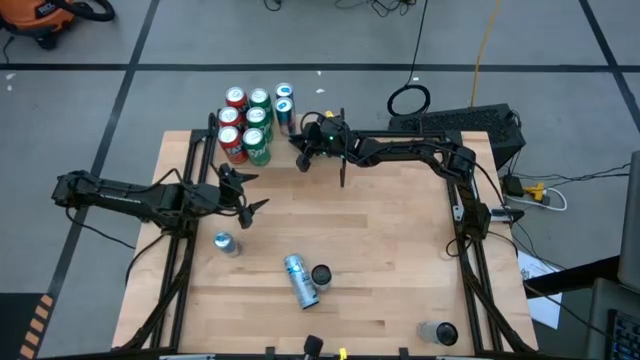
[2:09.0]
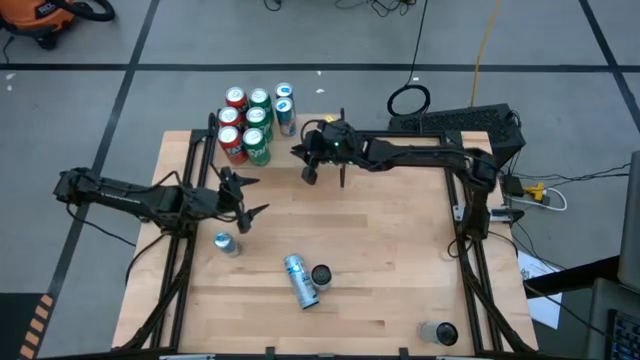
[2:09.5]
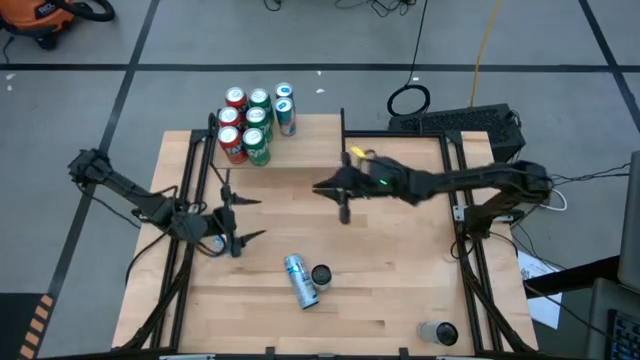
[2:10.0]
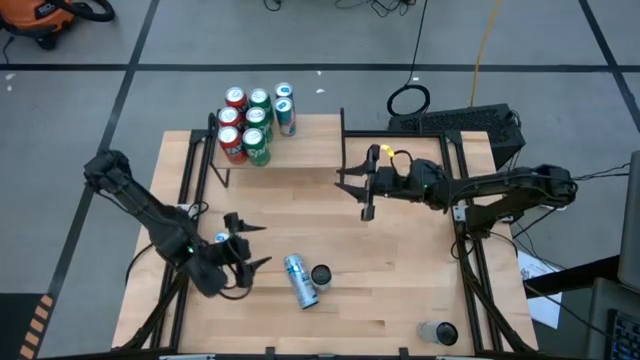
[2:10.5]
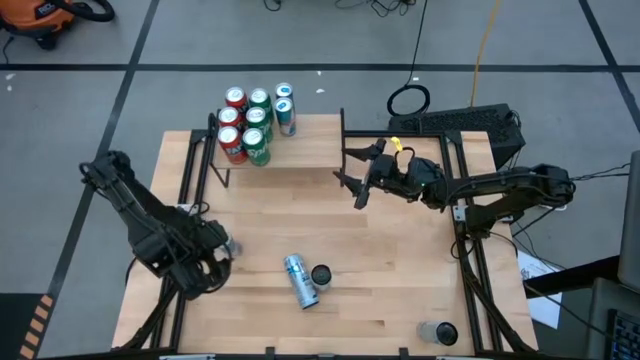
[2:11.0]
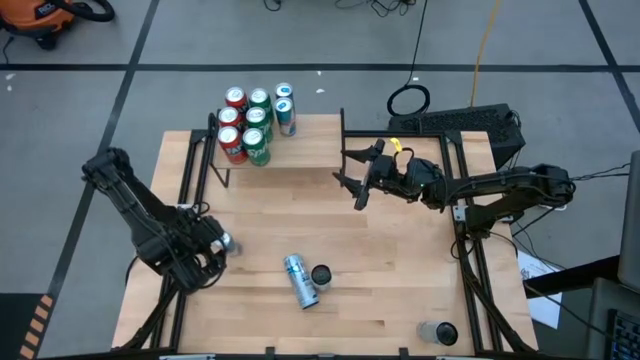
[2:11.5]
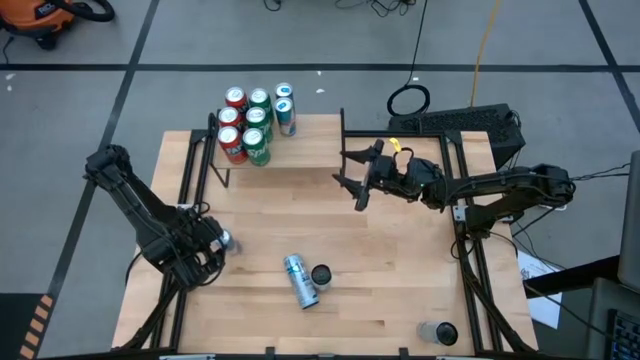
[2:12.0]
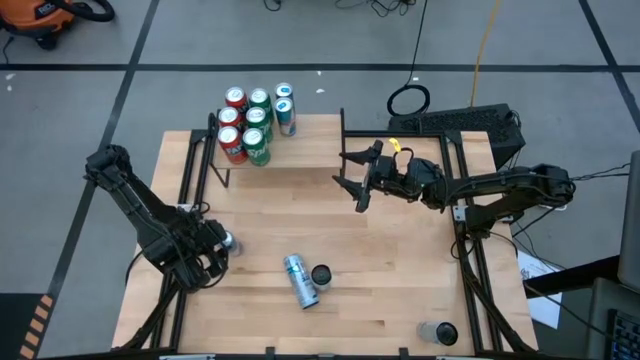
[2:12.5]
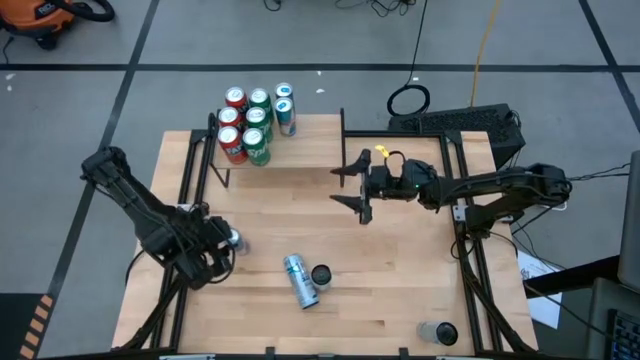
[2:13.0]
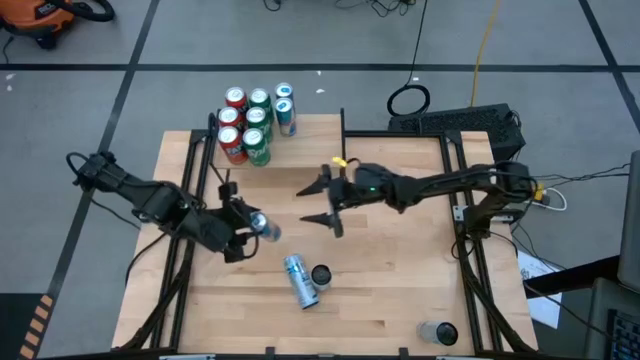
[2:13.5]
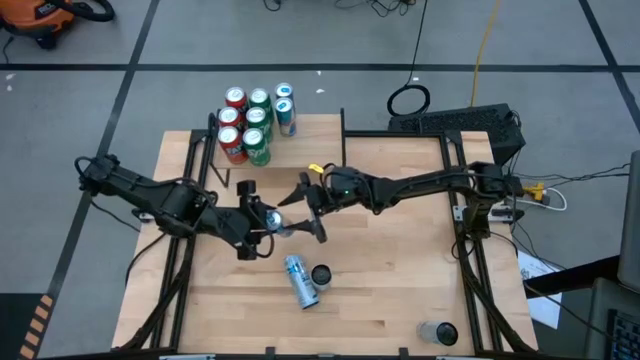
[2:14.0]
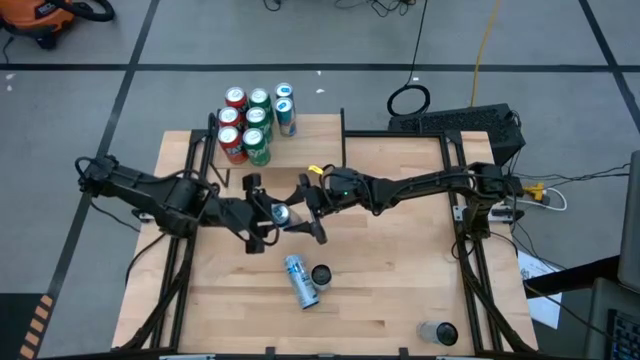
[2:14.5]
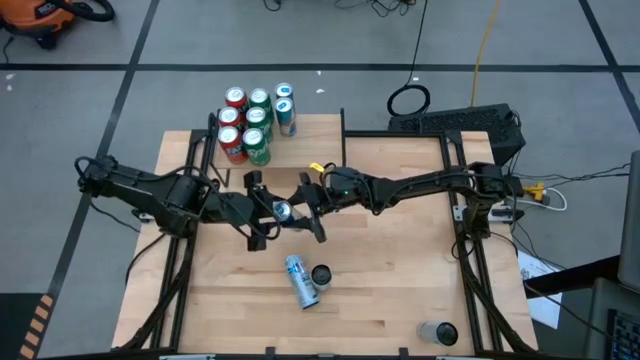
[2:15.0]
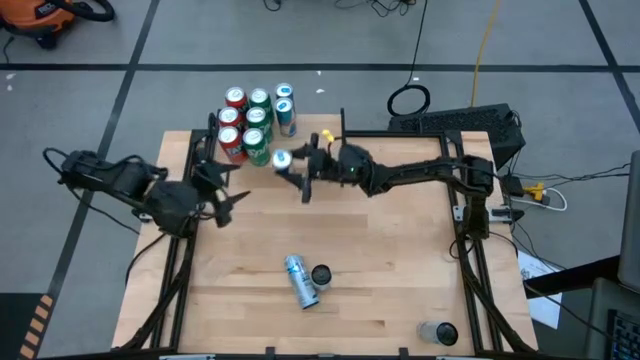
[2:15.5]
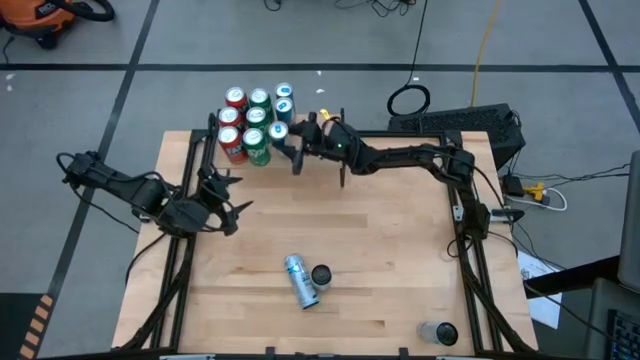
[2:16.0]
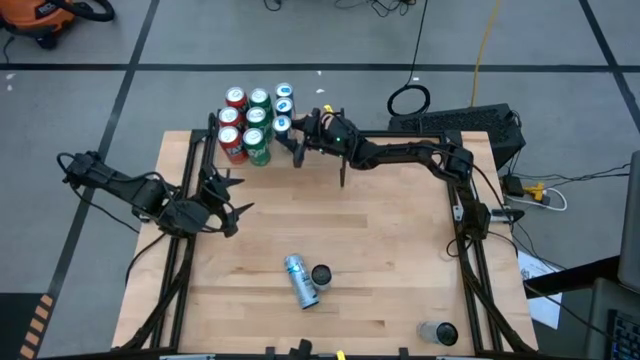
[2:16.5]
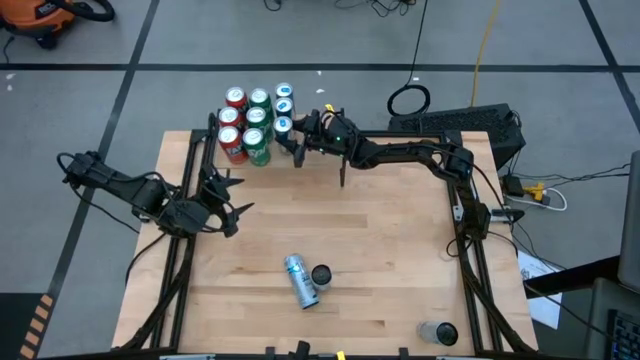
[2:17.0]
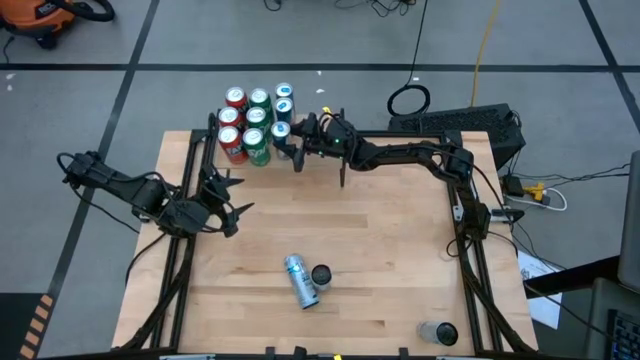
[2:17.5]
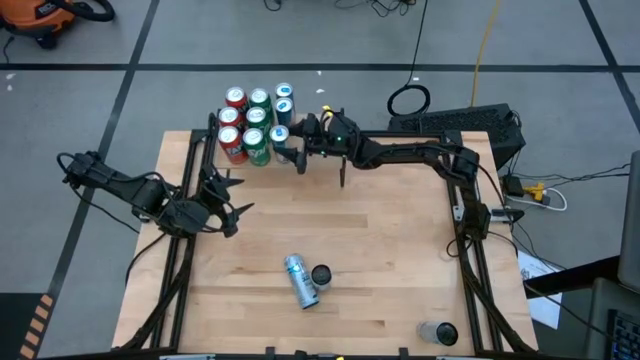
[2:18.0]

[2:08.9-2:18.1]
Task: Place canned beverage on shelf
Put the blue soda can on the shelf

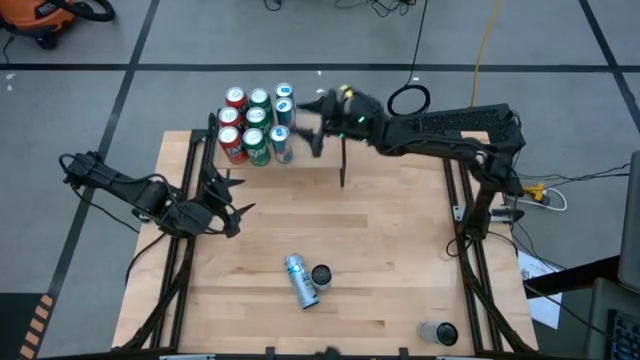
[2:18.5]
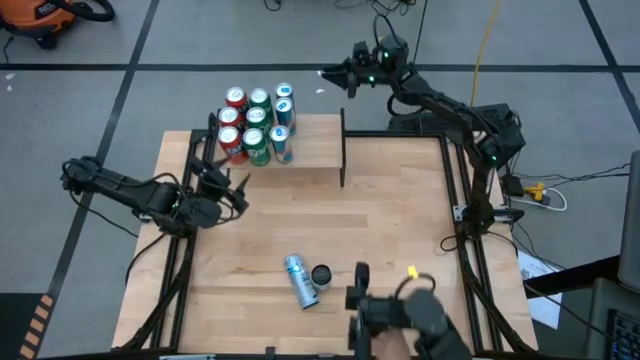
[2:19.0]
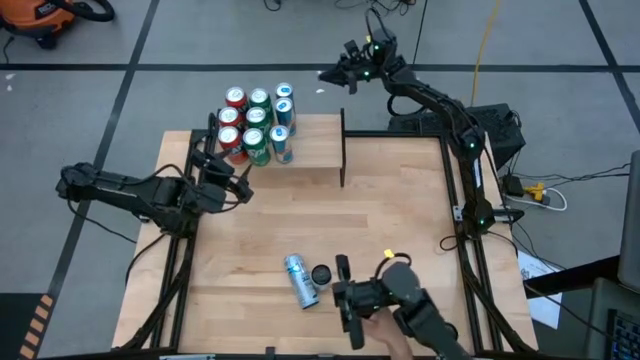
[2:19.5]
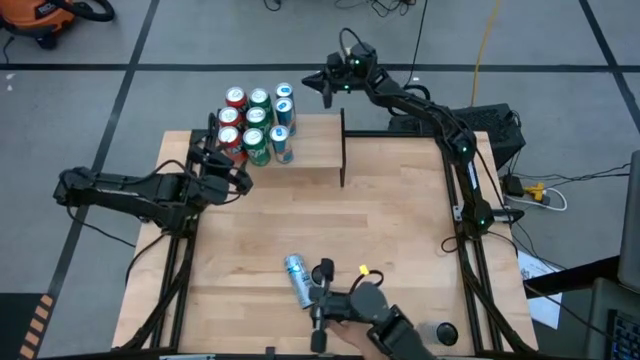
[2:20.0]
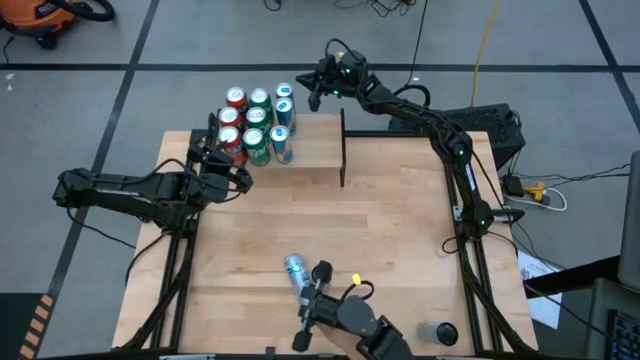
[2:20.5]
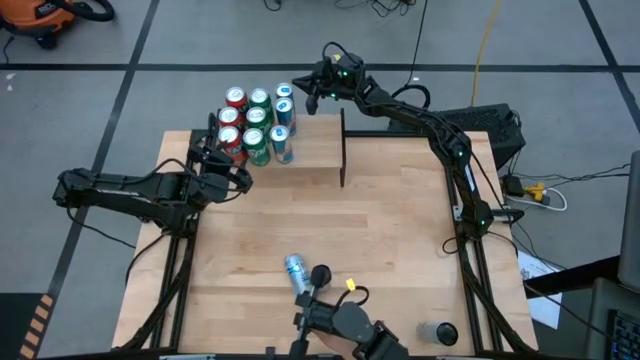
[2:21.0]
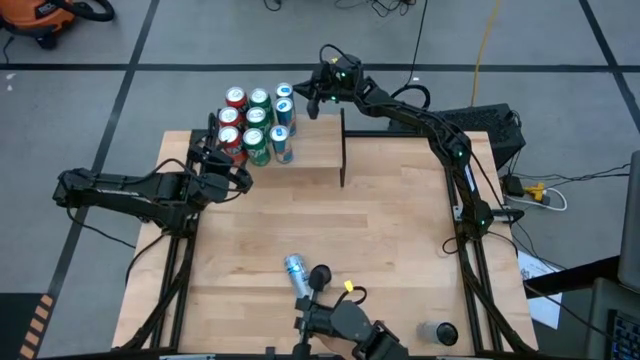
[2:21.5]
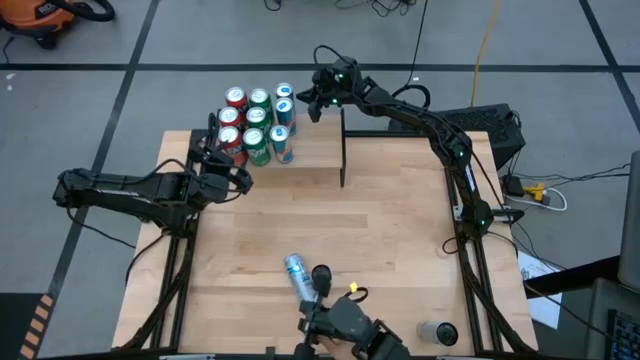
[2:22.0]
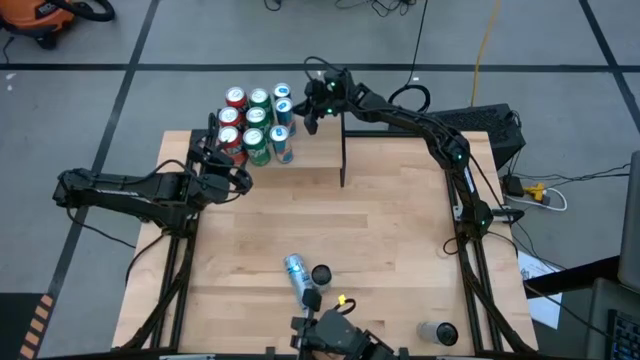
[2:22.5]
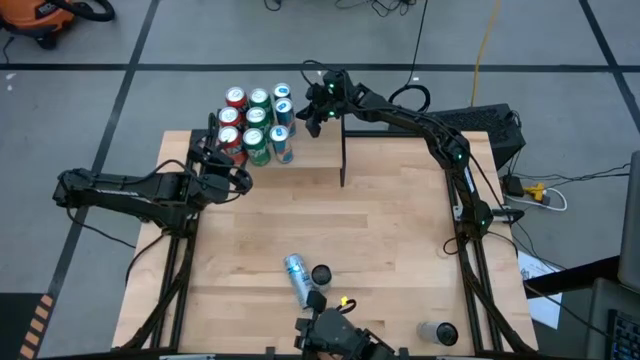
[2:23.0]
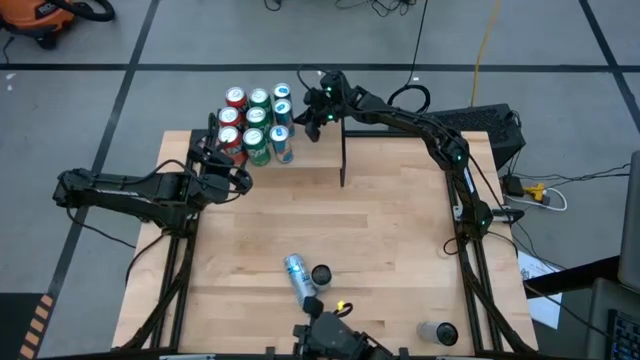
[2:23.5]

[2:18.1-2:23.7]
Adjust the blue soda cans on the shelf

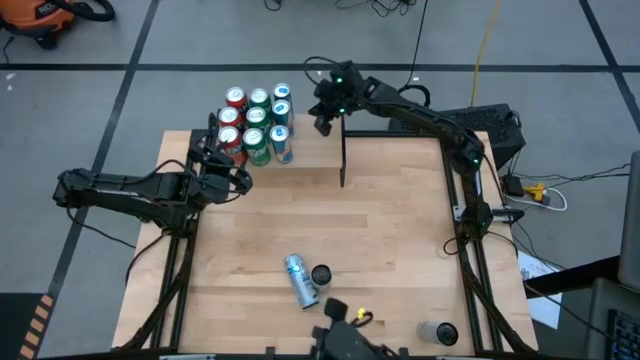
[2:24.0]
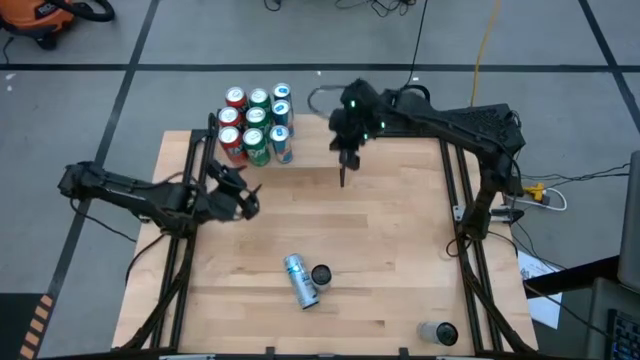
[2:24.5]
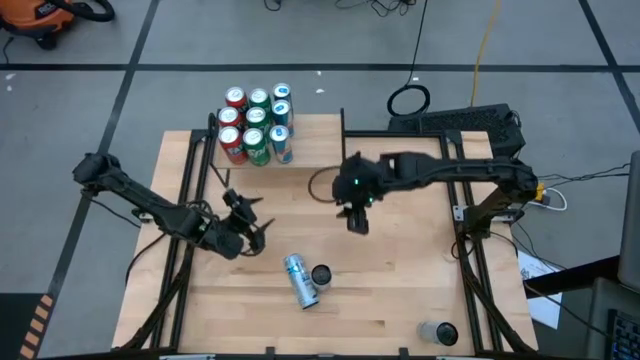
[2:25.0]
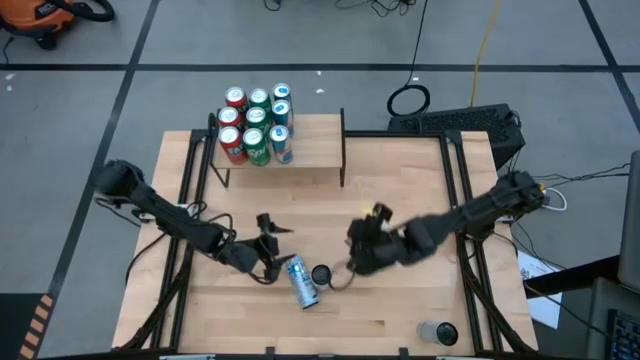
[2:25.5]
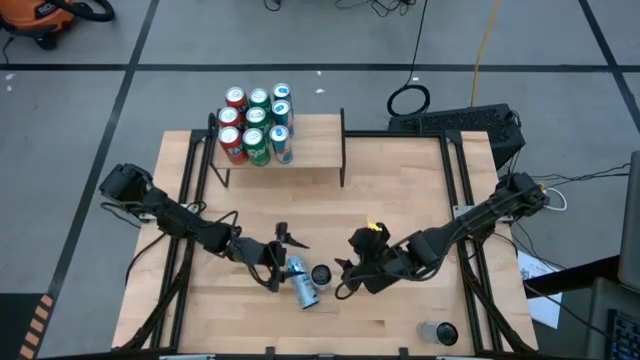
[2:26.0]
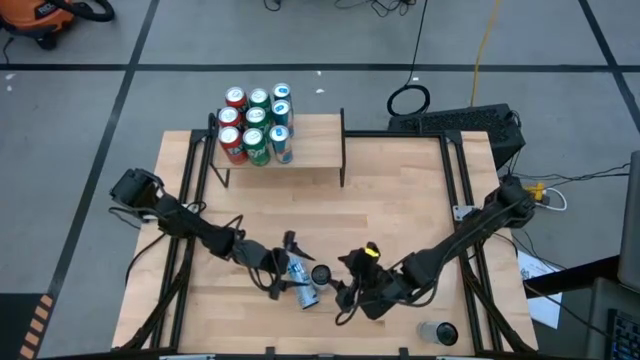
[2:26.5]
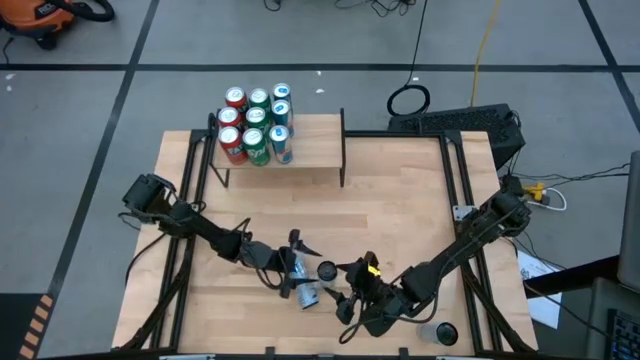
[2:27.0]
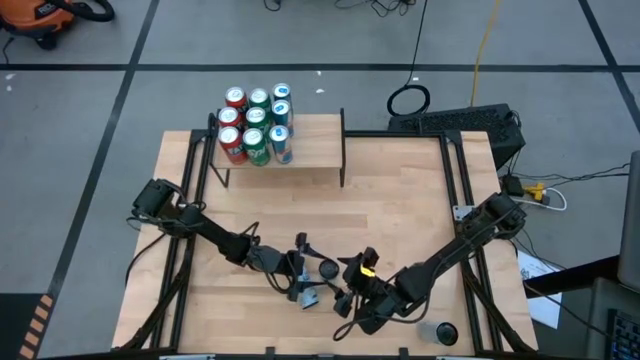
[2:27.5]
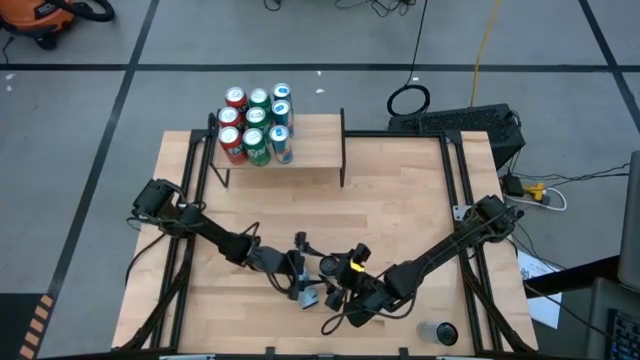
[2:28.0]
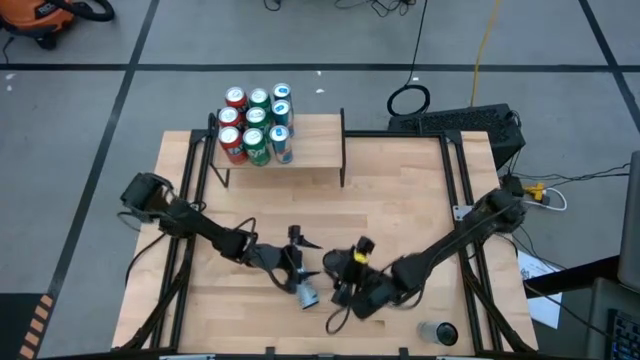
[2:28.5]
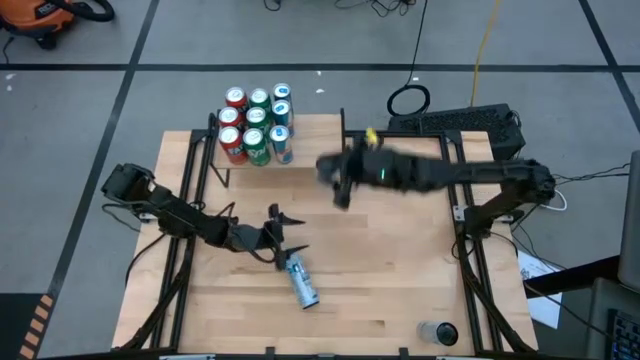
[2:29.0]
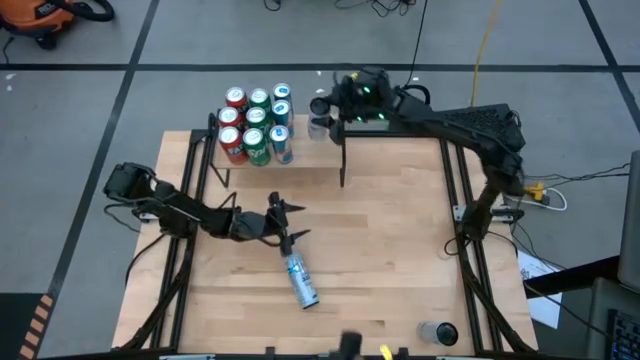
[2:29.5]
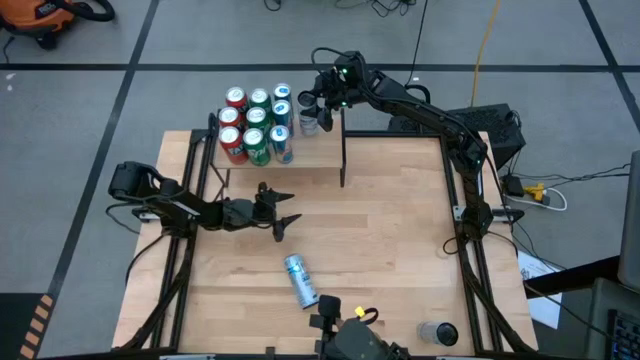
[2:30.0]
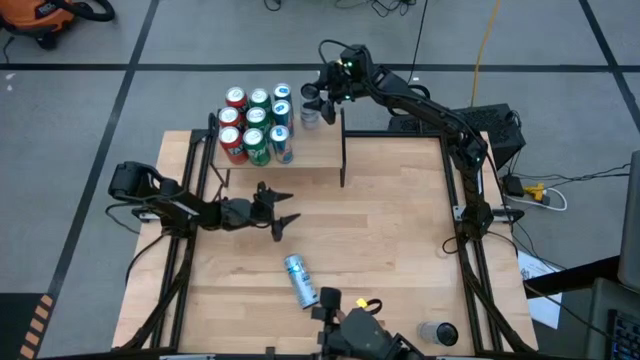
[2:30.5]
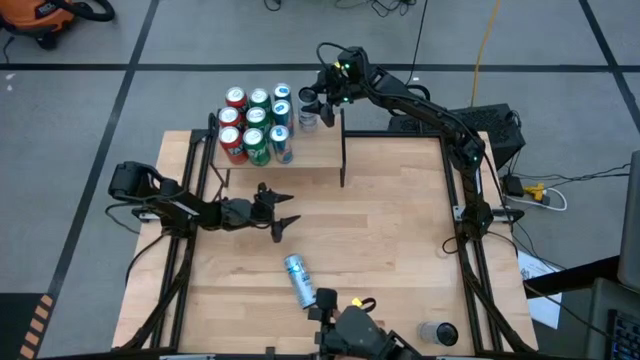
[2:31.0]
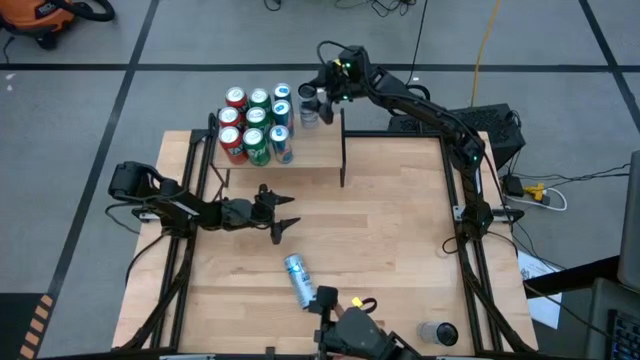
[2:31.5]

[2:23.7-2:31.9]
Put the center black soda can on the shelf
